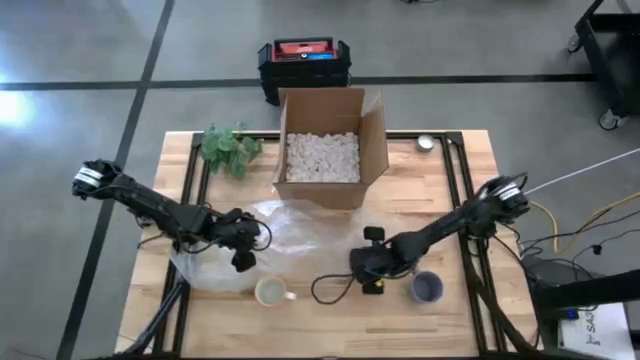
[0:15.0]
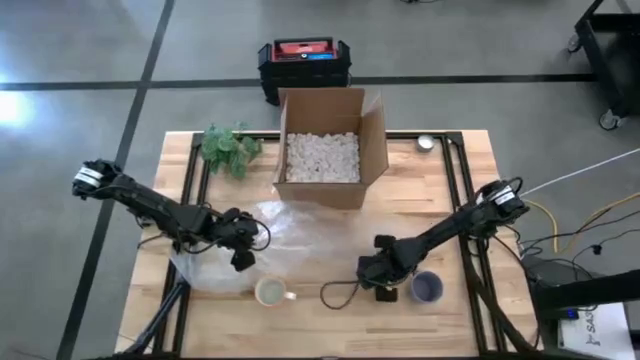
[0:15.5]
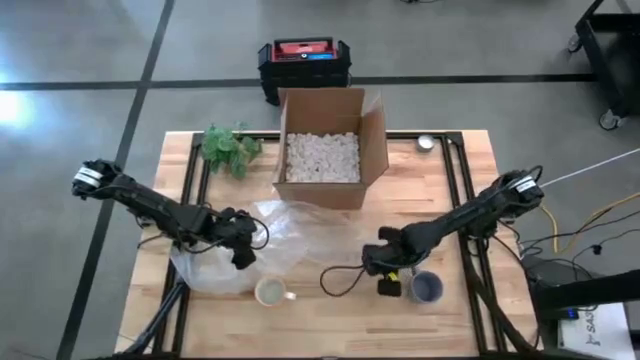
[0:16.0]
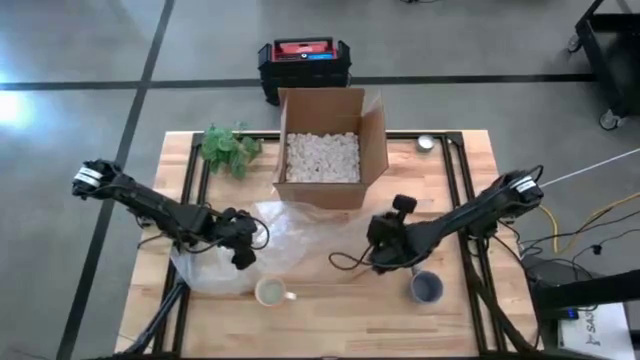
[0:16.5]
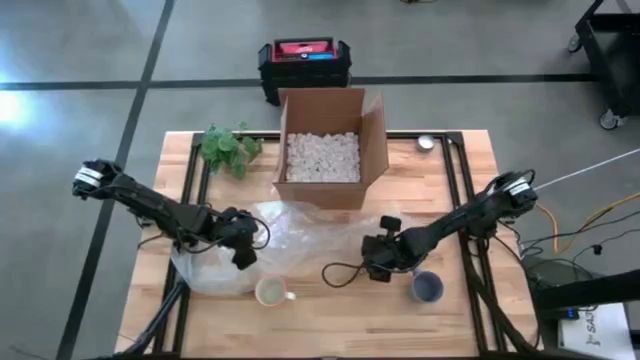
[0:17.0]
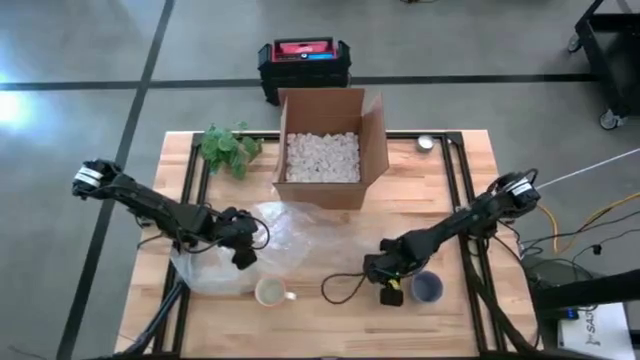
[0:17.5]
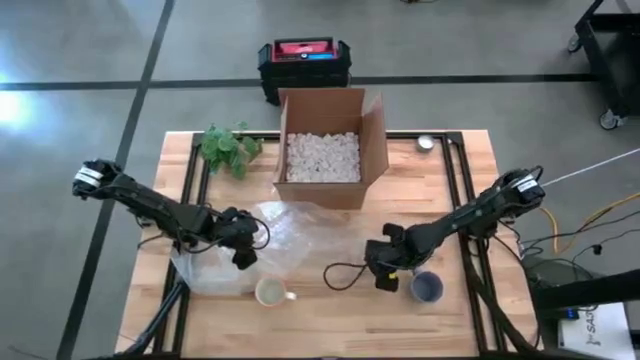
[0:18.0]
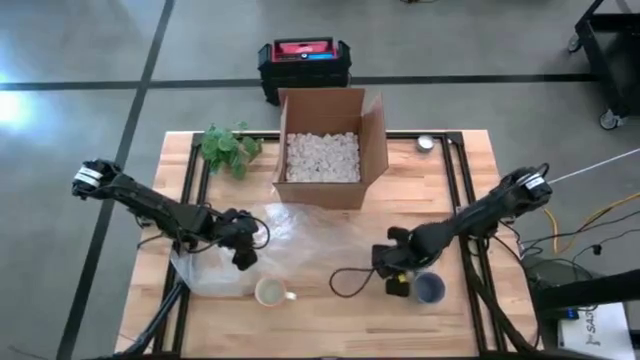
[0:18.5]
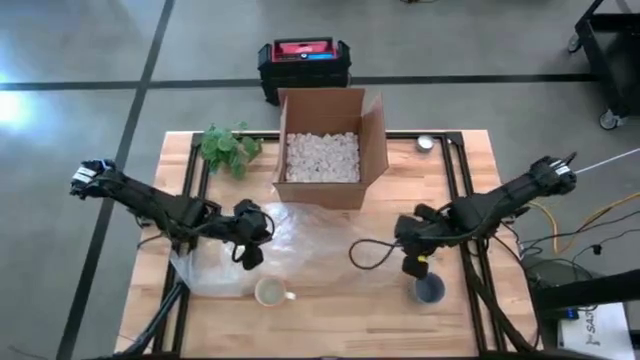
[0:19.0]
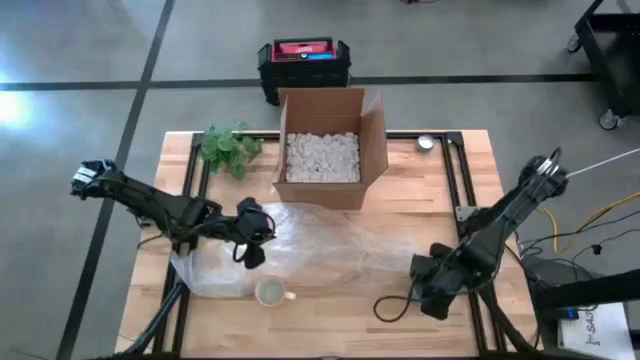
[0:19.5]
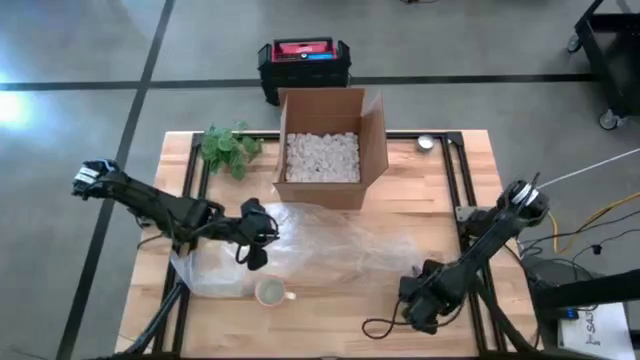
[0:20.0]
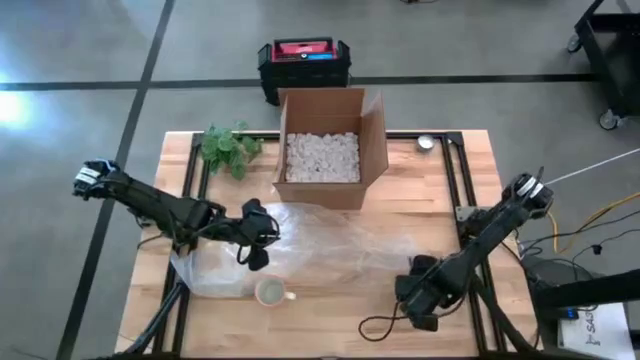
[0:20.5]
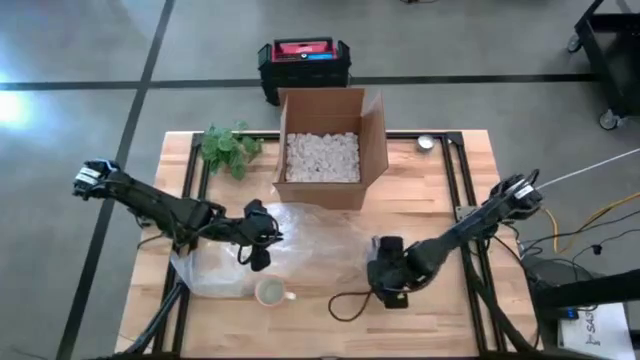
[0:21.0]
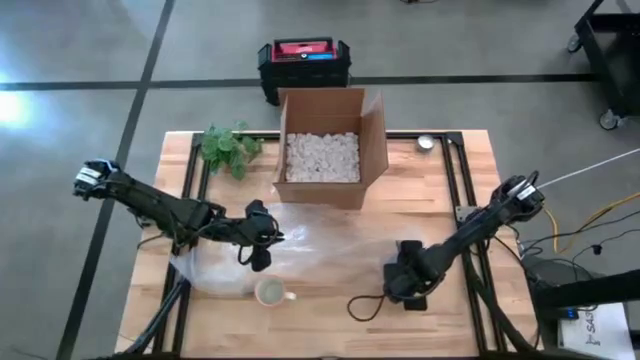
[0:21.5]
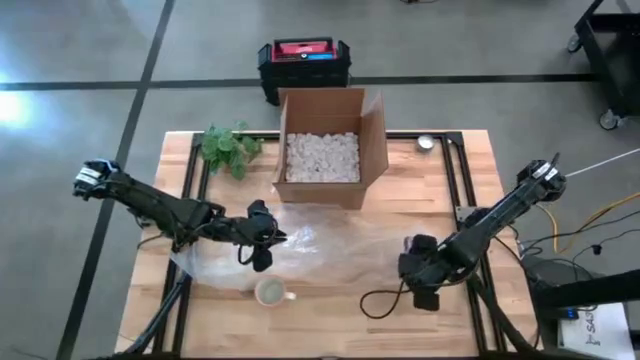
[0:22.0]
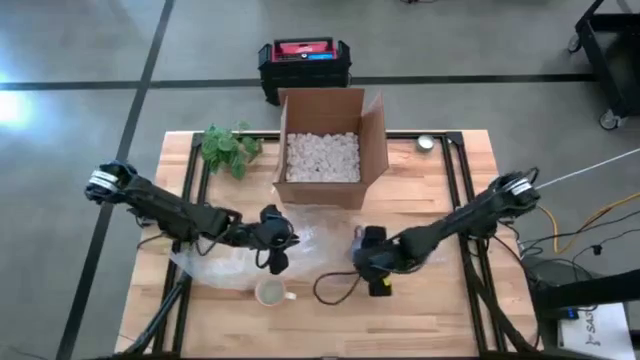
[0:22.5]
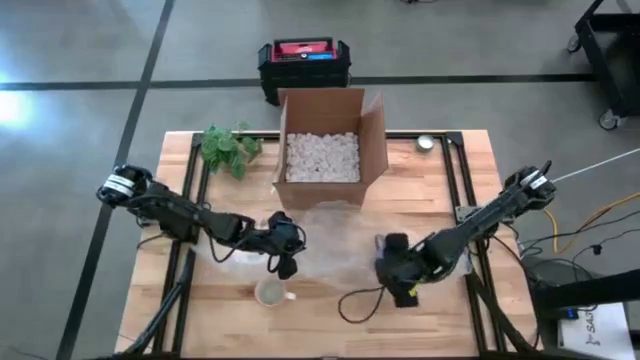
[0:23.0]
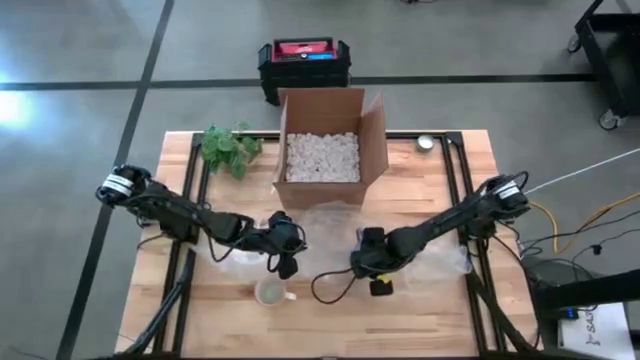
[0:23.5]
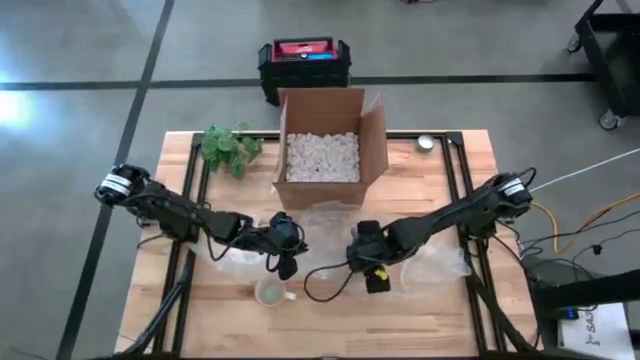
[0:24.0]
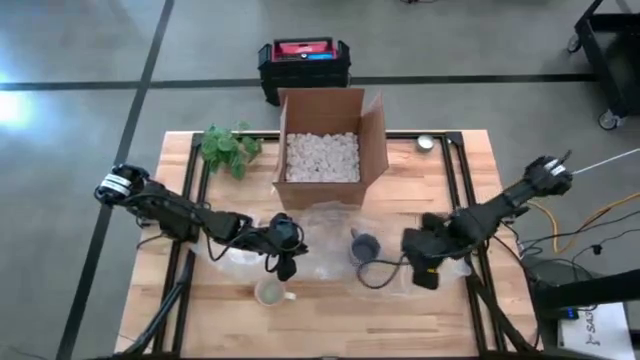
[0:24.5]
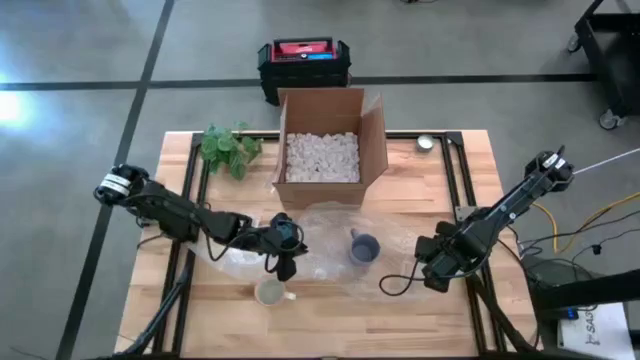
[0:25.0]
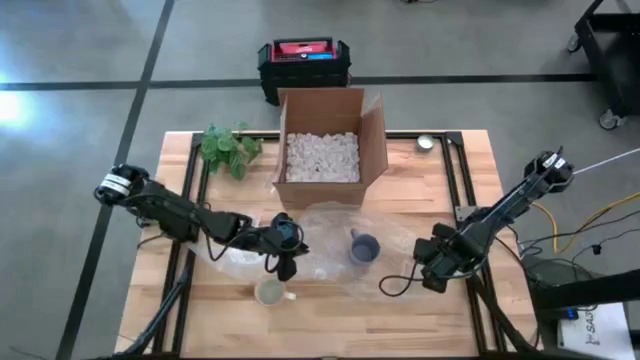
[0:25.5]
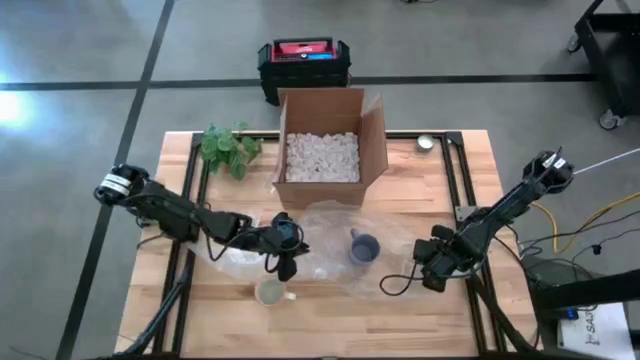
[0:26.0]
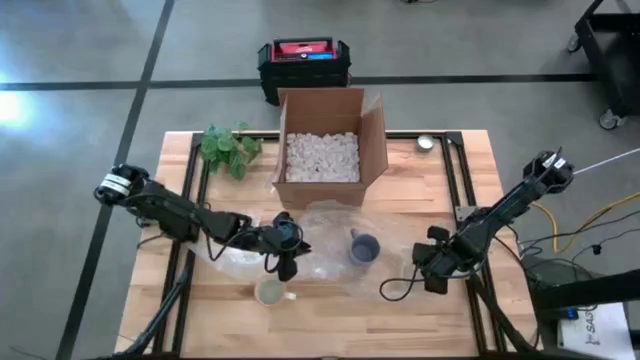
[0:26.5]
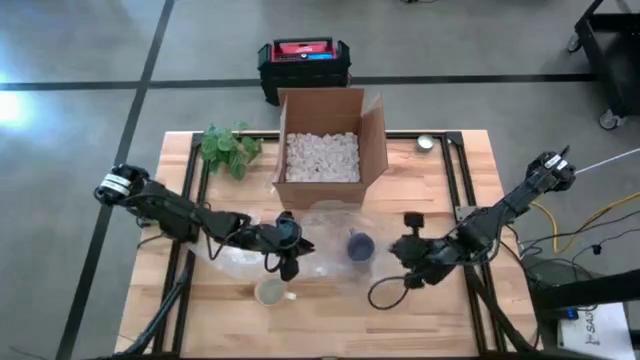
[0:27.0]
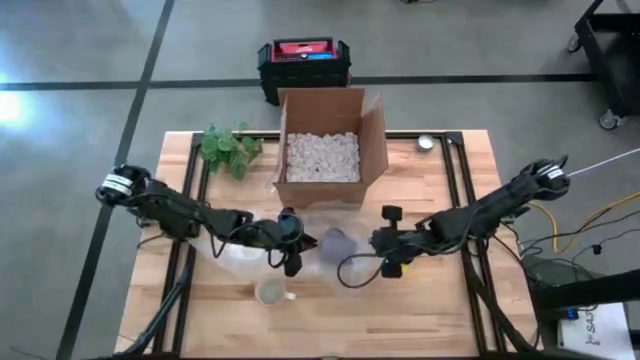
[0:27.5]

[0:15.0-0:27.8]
Task: wrap mug
Wrap the blue mug with the right bubble wrap

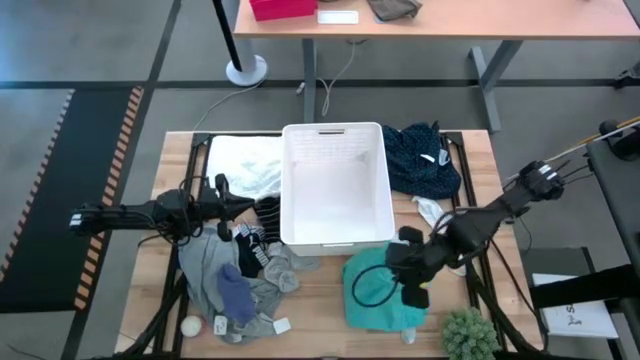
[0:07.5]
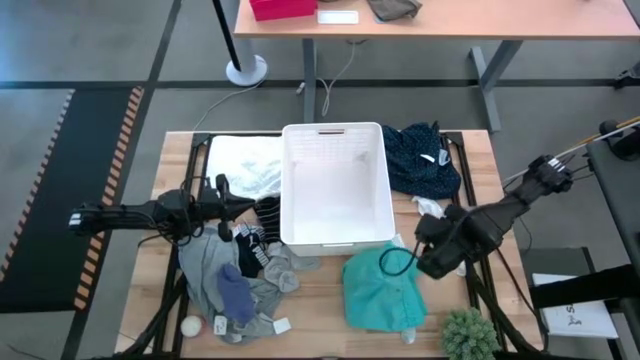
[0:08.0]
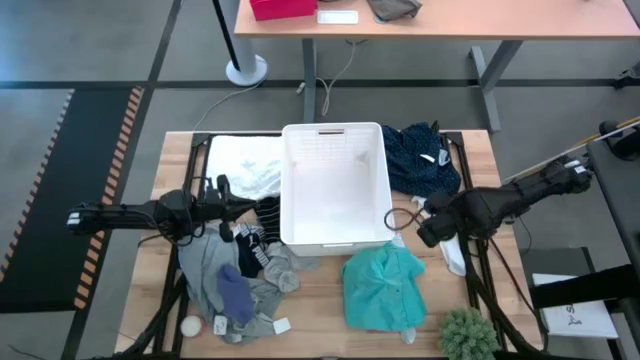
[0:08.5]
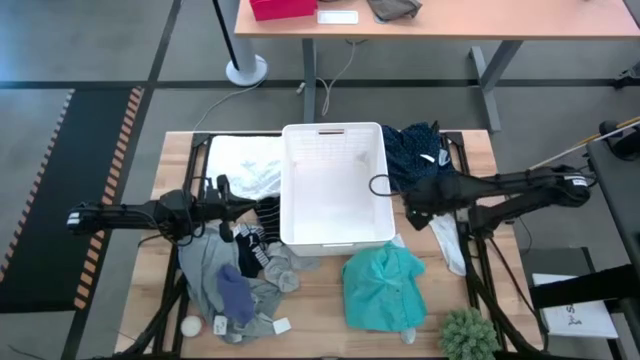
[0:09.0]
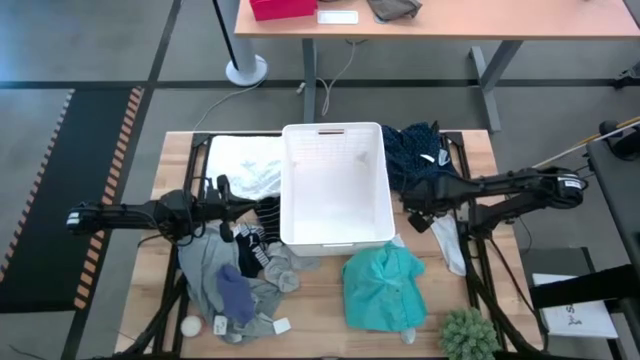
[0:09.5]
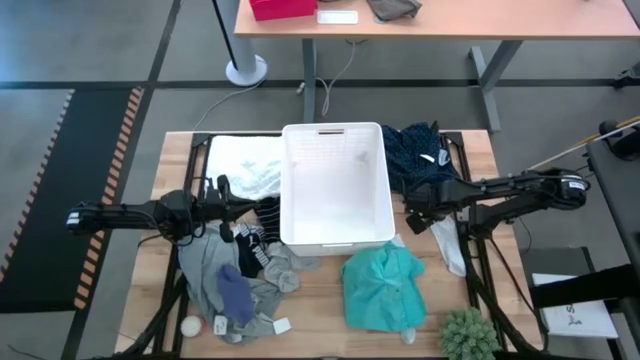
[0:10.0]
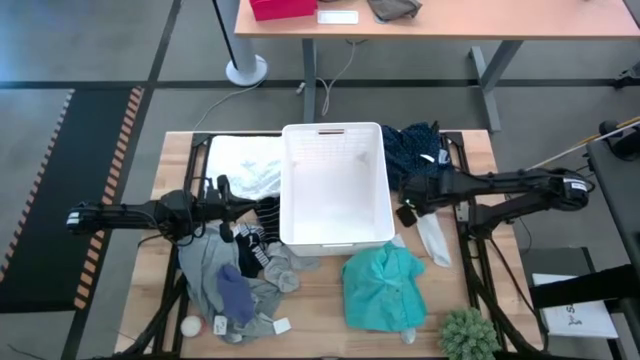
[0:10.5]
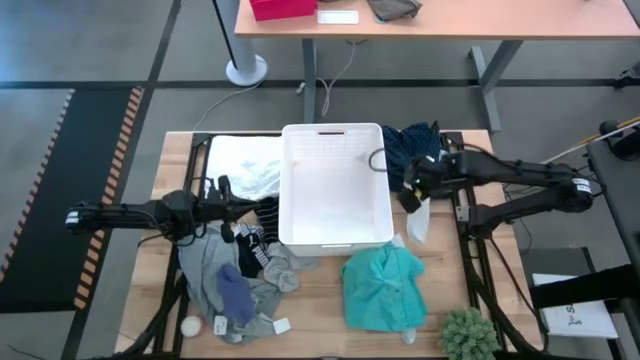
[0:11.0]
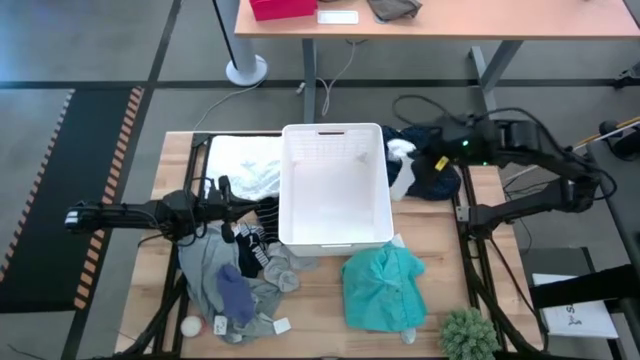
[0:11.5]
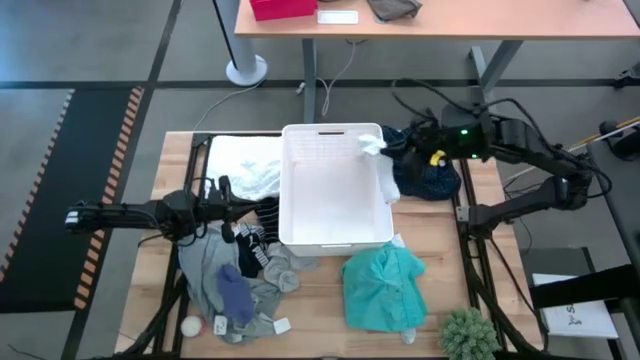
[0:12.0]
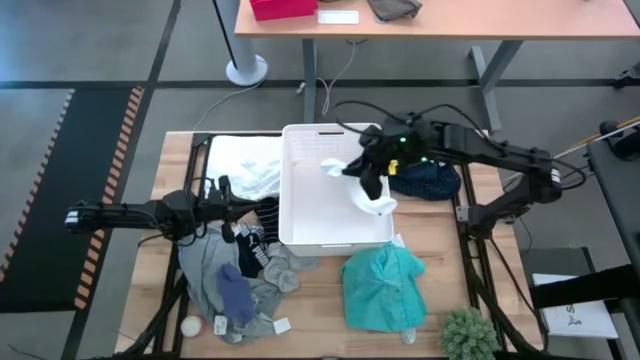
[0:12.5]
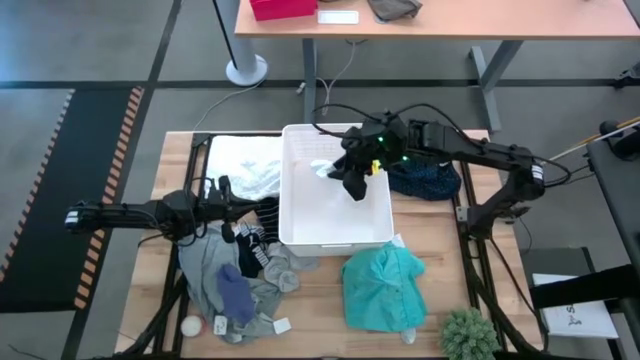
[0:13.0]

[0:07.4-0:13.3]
Task: Sort clothes
Put the right white sock into the white bin
